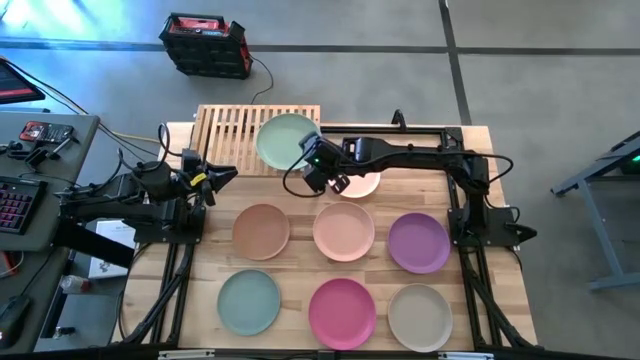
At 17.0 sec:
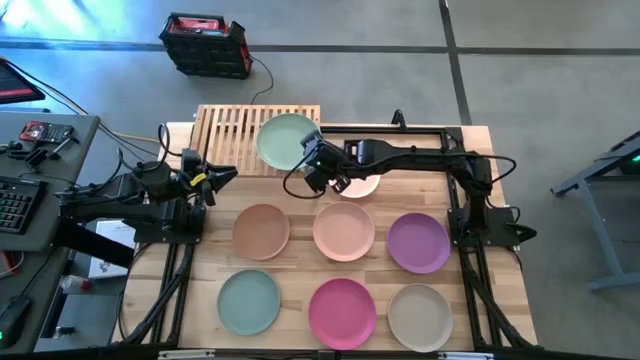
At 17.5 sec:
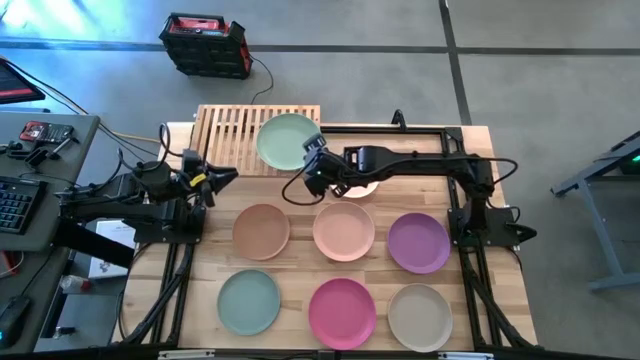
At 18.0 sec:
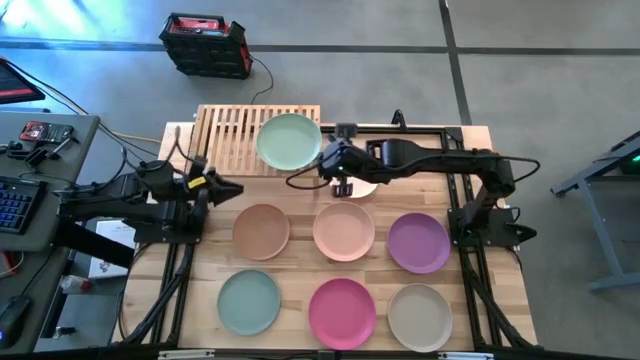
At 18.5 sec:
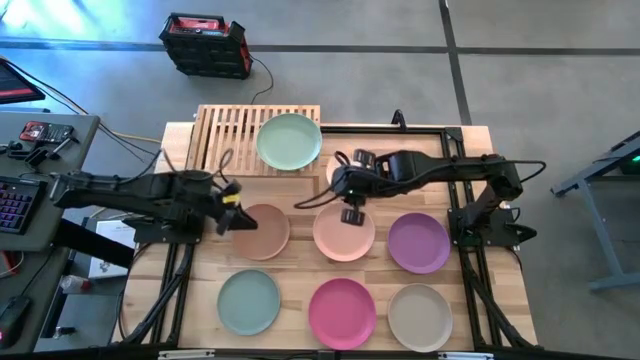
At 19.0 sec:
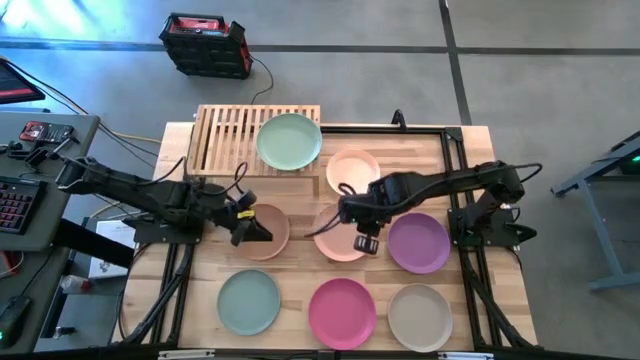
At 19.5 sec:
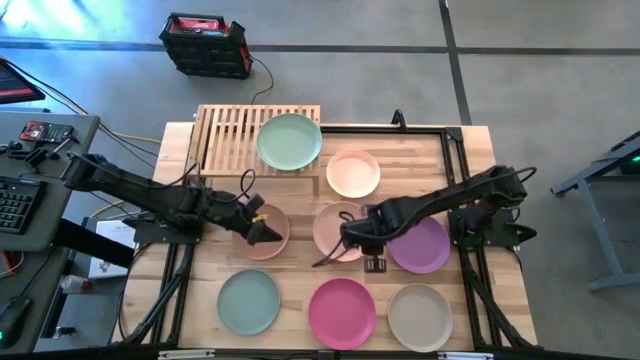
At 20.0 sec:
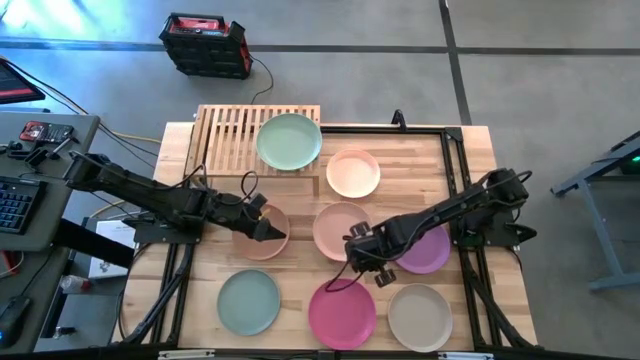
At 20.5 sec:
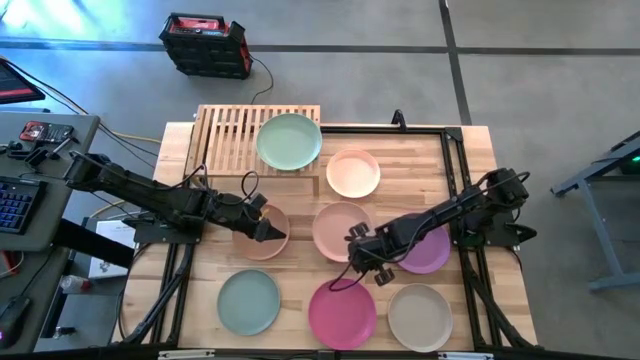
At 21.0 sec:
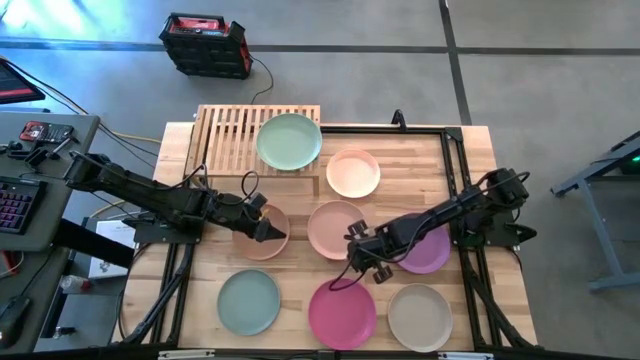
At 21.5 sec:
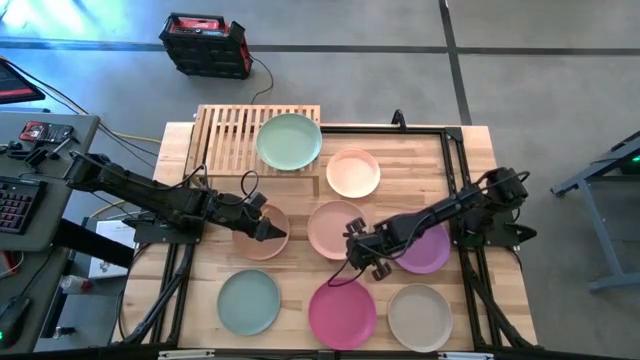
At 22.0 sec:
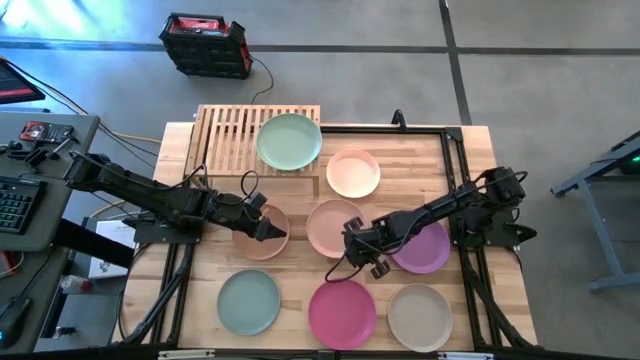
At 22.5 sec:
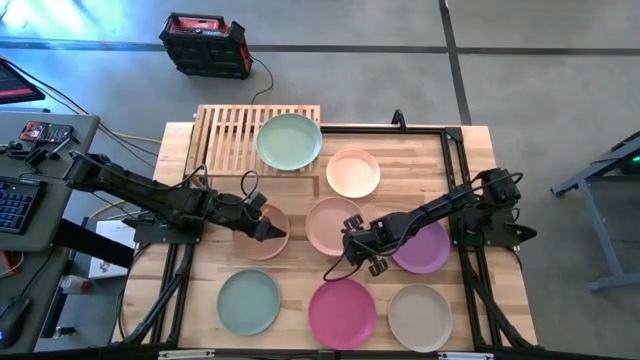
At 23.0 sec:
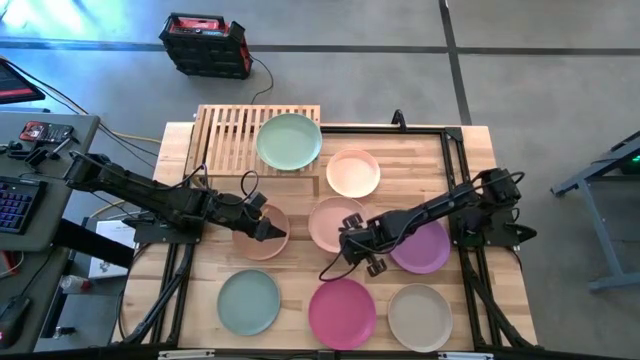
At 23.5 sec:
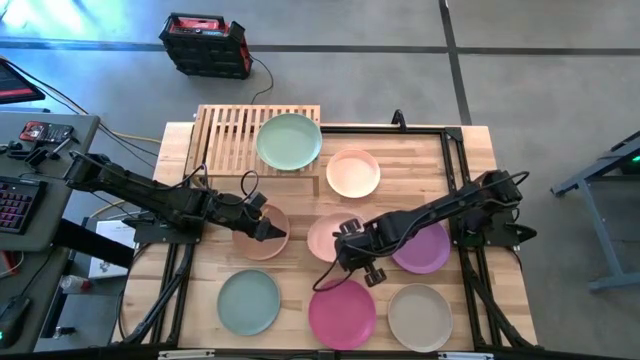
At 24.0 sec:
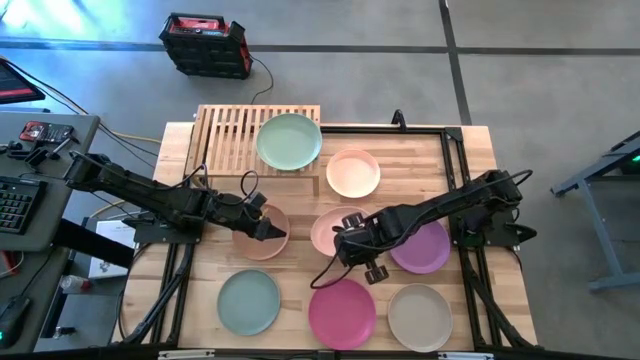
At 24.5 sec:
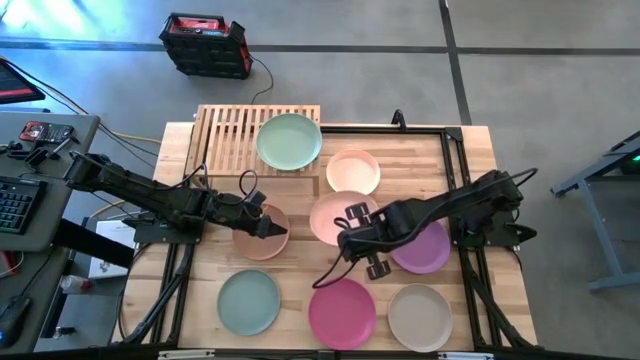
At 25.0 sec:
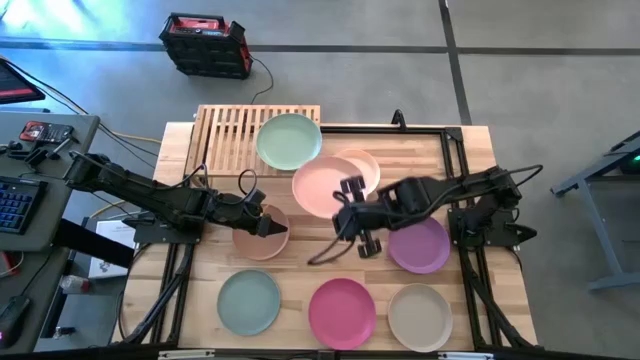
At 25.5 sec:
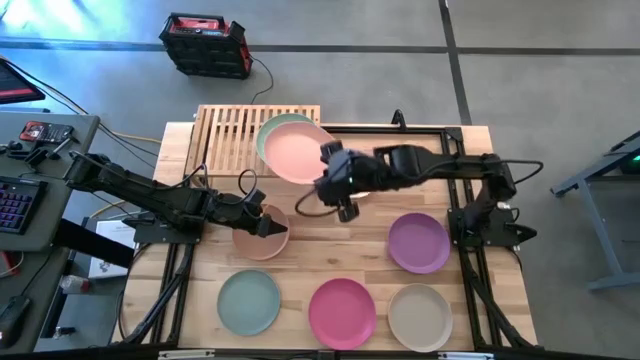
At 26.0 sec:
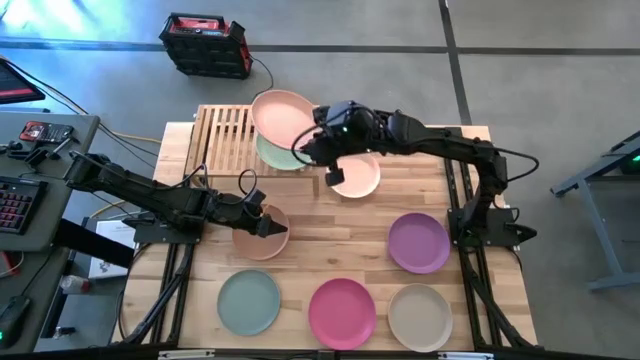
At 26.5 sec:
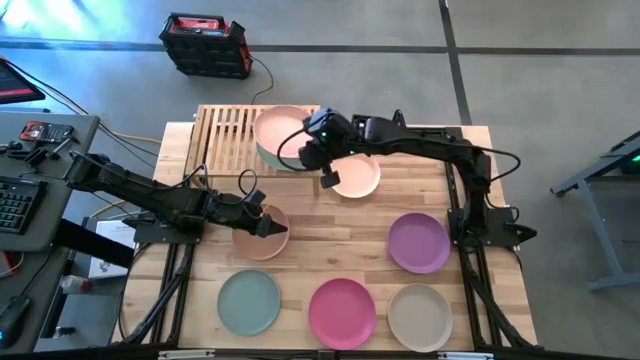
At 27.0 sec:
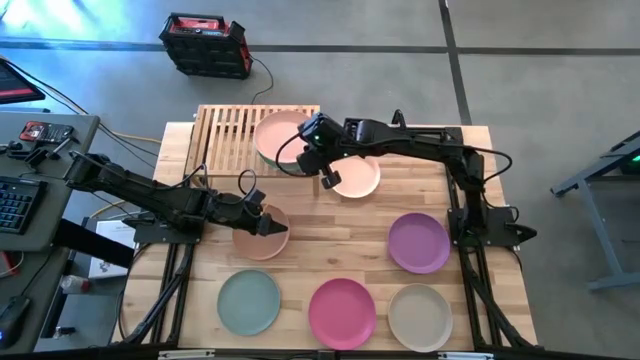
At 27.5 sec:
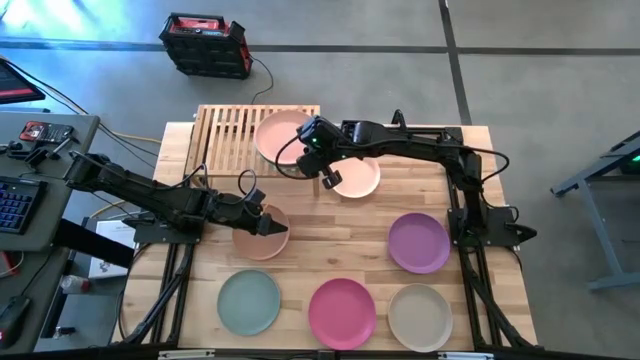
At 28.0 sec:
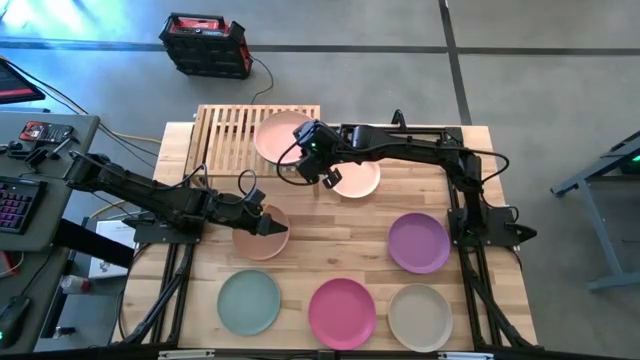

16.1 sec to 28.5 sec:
Task: Place and stack plates onto a shelf
Stack the brown plate on top of the blue plate on the shelf
